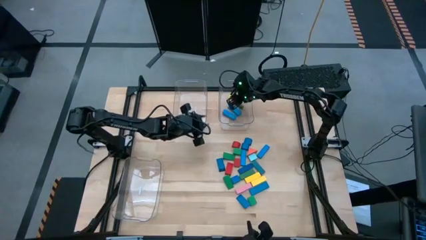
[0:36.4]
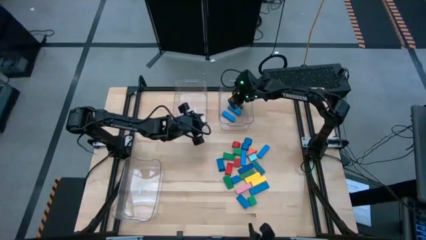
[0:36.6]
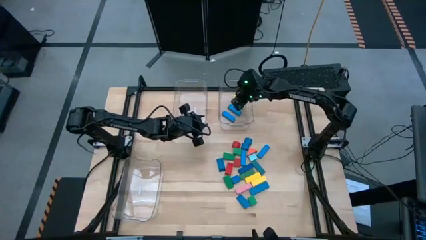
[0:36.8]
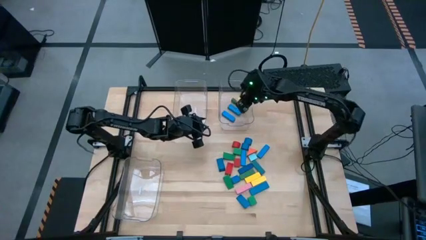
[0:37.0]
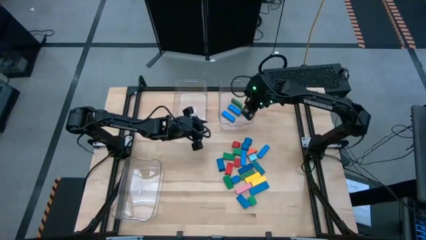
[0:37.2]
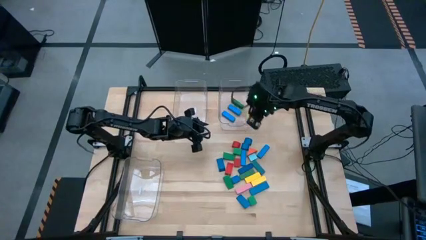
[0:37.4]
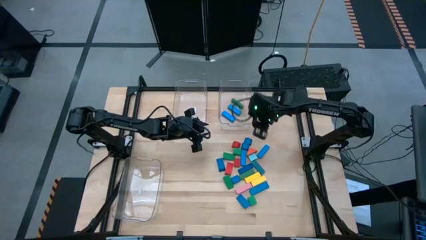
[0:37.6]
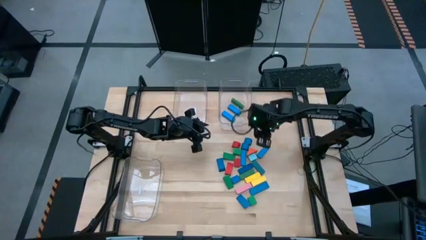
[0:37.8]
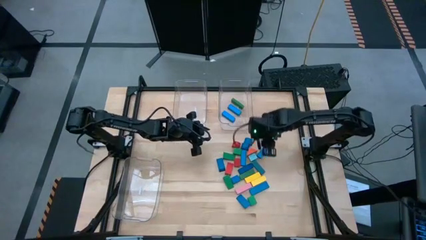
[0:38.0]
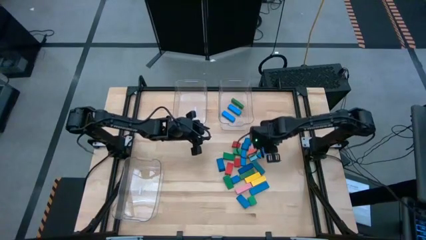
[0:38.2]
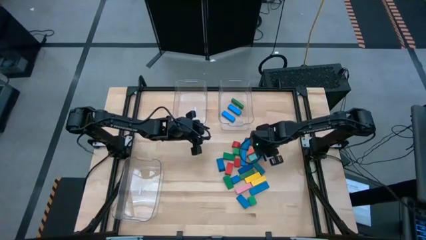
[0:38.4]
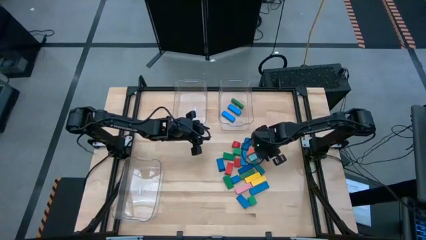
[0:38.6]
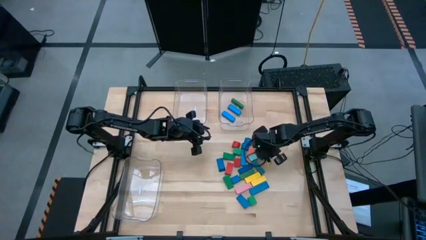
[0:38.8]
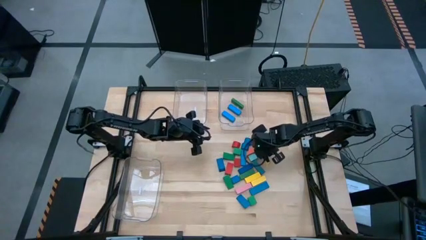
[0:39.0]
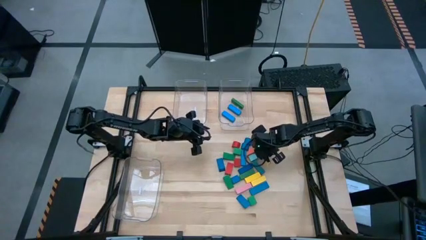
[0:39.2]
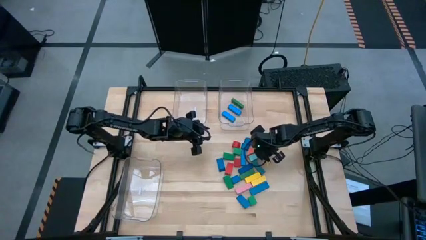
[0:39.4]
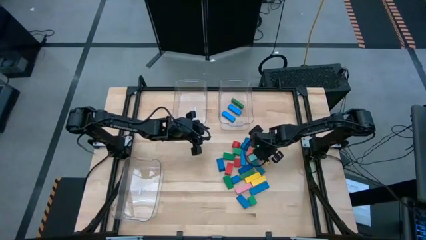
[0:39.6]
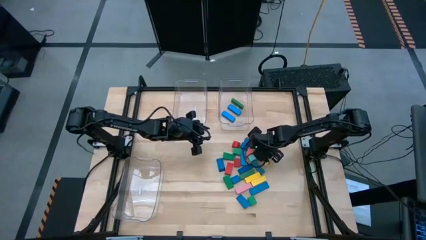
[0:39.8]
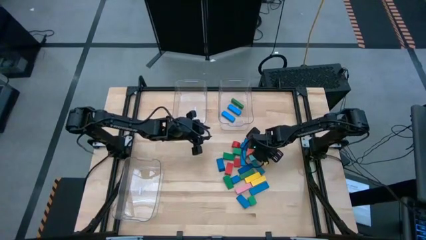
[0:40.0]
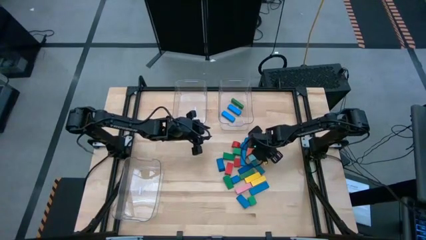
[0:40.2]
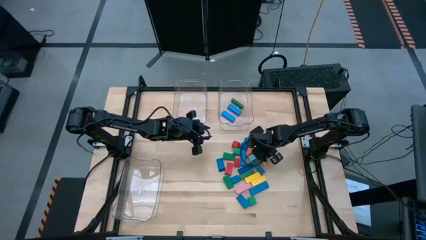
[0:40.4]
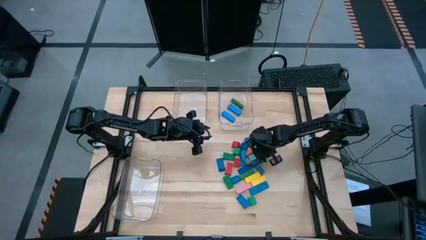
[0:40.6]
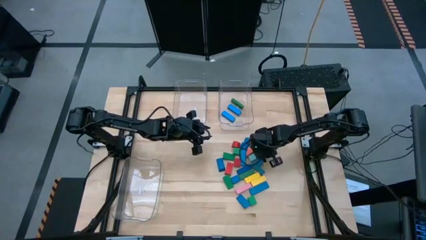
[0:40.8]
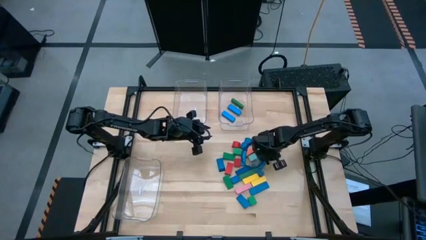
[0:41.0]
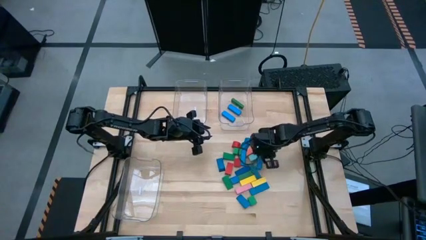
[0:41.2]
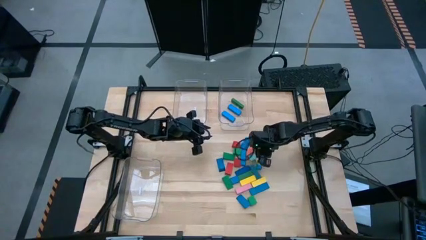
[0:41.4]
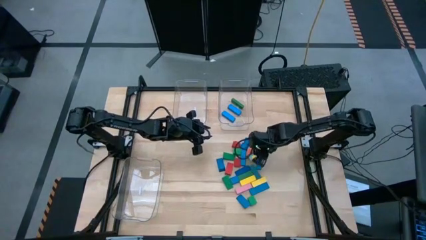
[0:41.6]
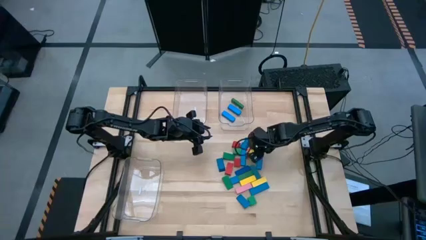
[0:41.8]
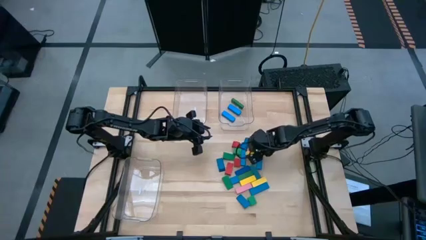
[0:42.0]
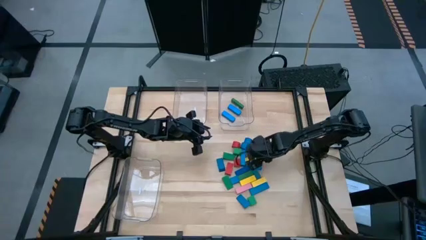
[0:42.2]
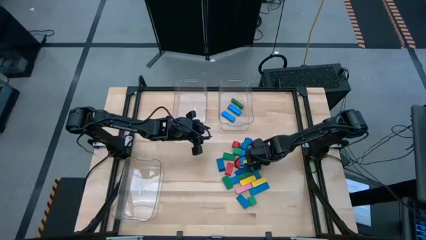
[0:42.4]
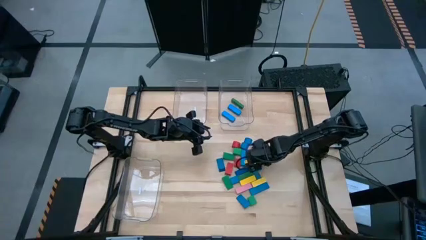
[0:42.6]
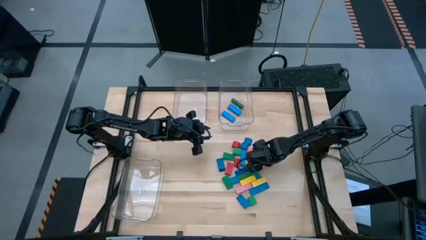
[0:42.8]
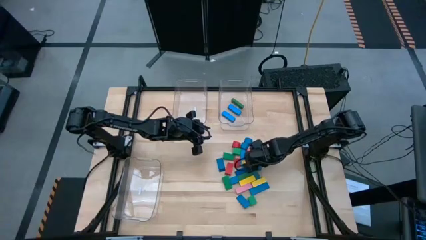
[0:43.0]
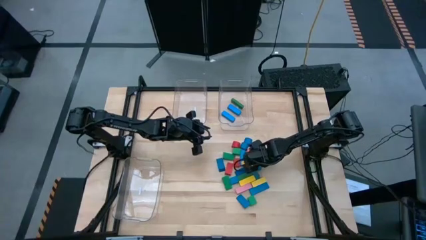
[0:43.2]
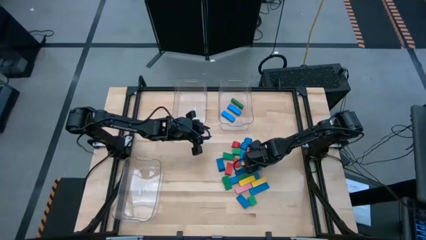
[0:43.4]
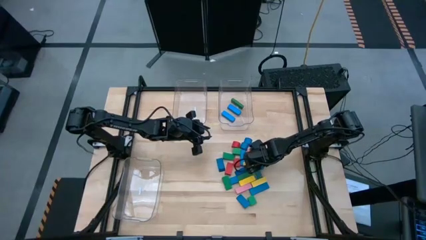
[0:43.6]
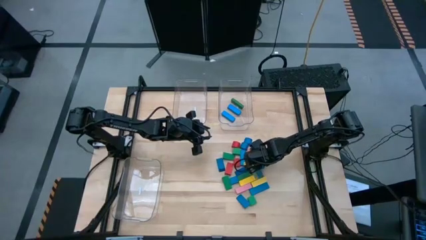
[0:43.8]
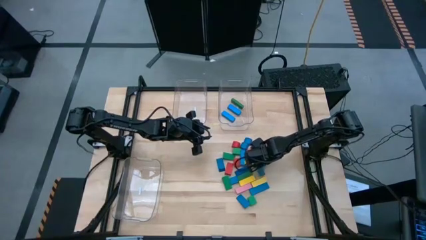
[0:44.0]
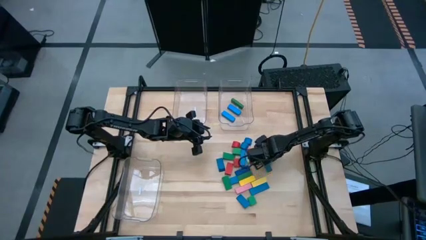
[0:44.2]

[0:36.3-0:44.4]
Task: Sort blocks by size
Put the blue rectangular block into the top right transparent bin

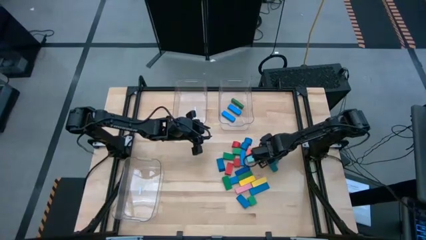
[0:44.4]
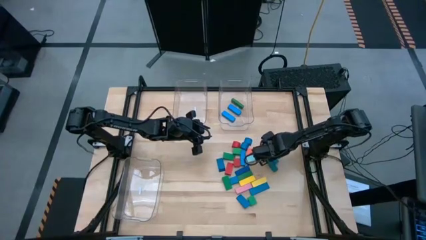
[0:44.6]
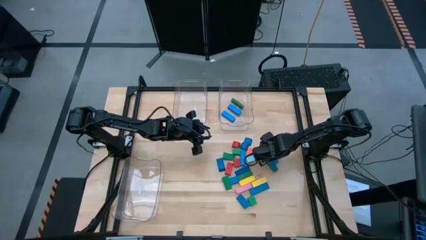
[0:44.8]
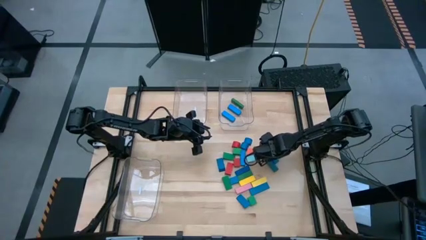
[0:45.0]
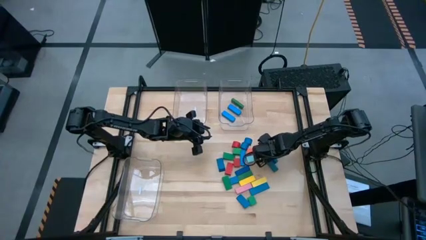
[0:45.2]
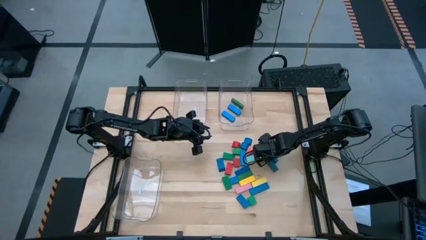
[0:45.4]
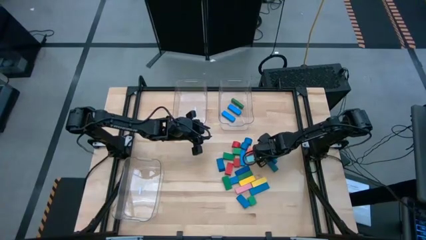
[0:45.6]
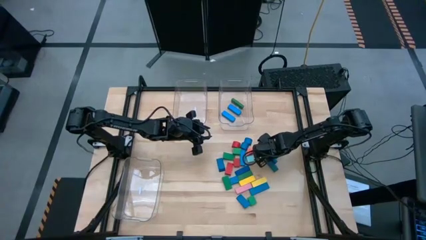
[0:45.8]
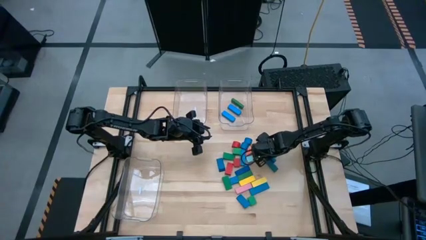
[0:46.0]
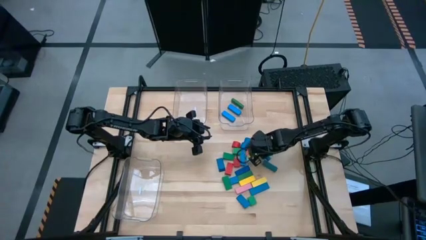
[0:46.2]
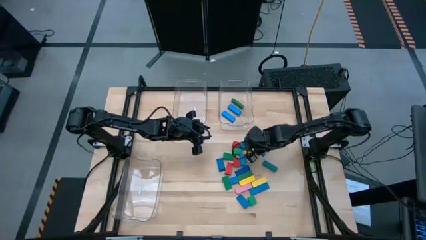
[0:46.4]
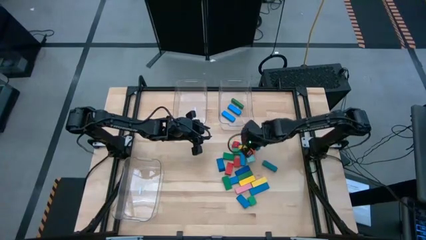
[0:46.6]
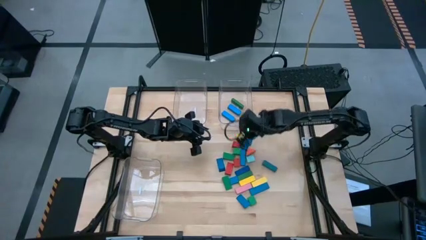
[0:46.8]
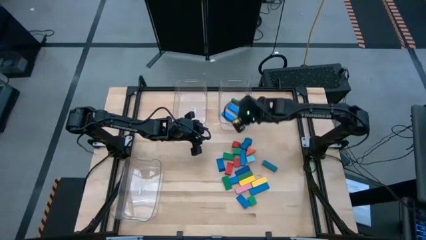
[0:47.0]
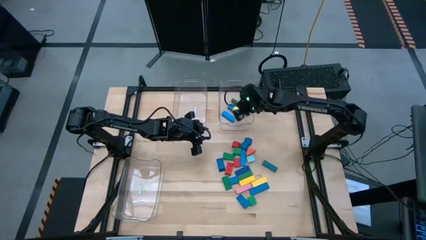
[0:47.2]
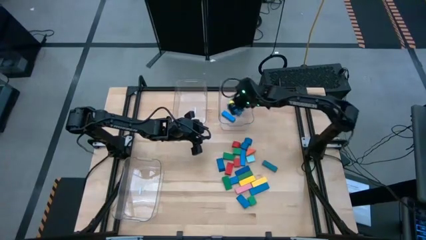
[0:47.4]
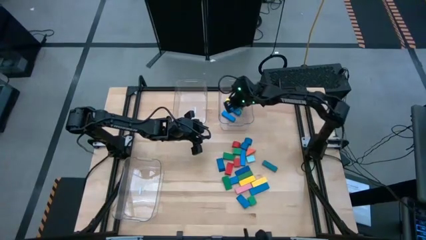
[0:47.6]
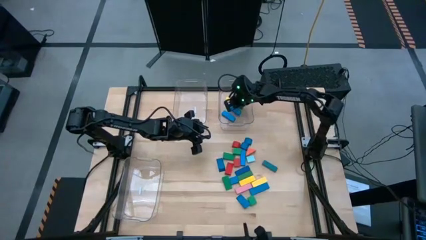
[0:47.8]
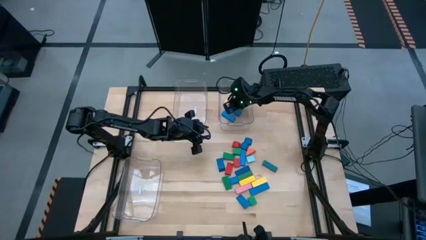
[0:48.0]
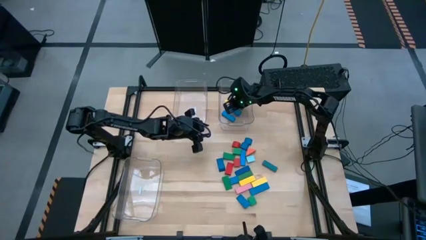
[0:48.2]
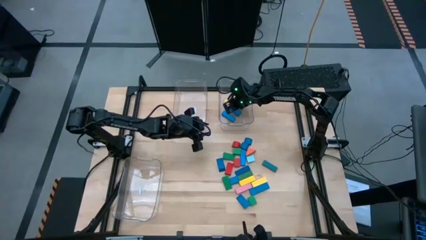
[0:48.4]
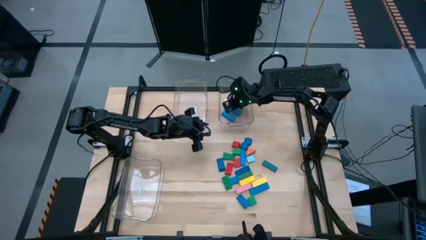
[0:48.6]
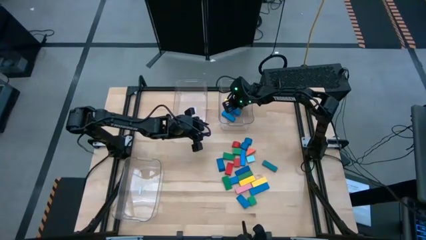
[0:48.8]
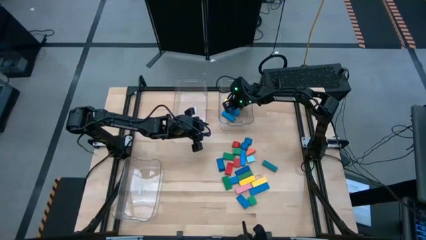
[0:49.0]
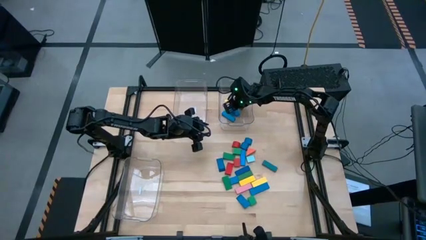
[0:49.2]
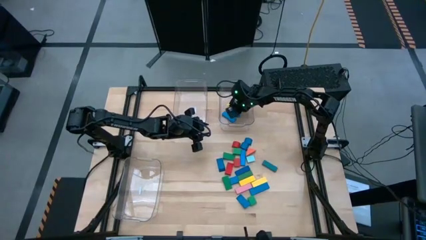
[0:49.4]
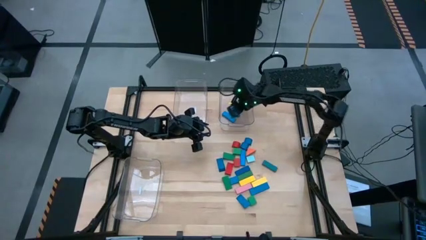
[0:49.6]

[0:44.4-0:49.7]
Put the blue rectangular block into the top right transparent bin

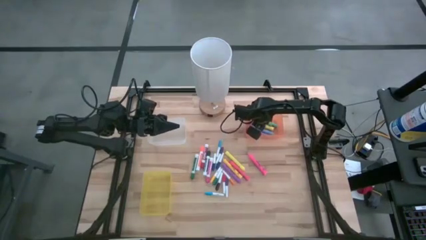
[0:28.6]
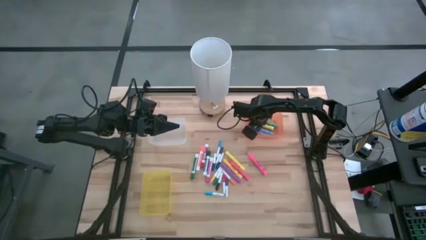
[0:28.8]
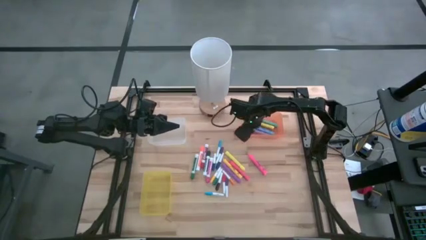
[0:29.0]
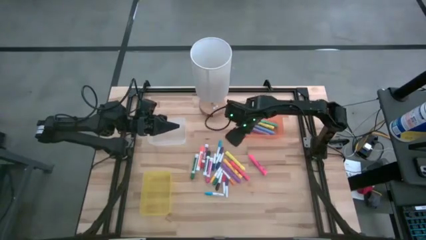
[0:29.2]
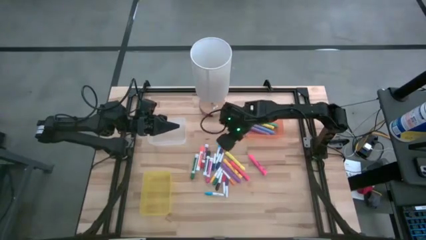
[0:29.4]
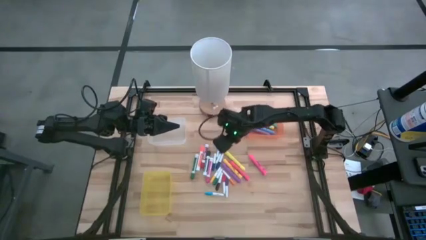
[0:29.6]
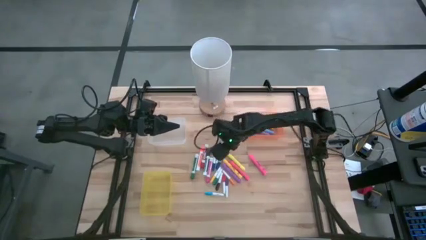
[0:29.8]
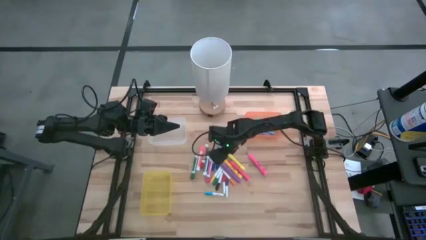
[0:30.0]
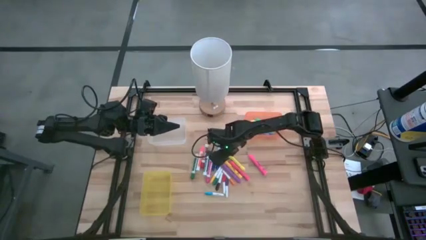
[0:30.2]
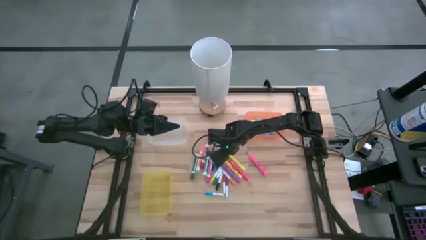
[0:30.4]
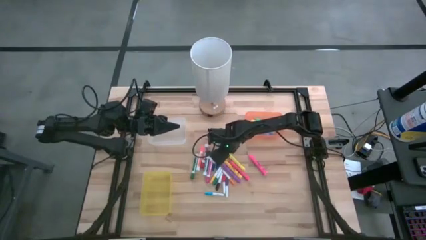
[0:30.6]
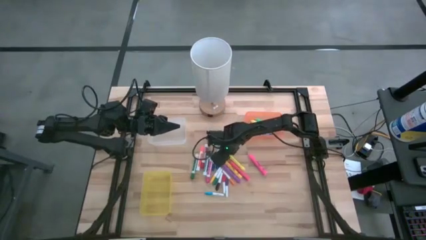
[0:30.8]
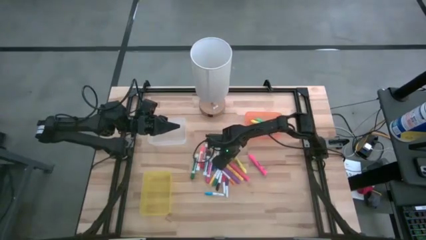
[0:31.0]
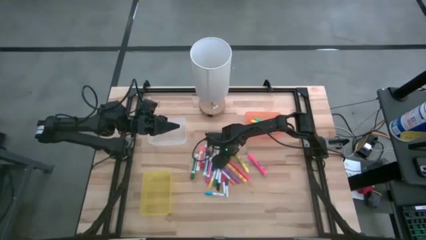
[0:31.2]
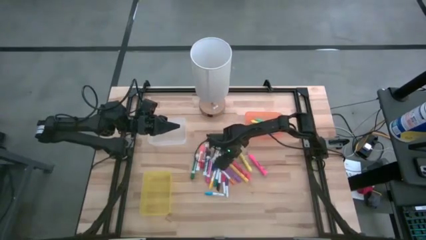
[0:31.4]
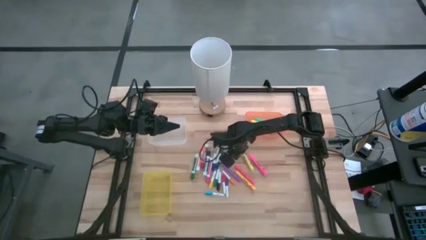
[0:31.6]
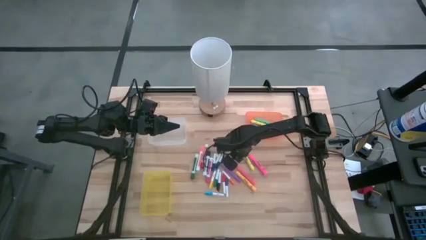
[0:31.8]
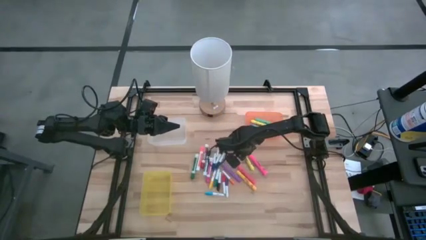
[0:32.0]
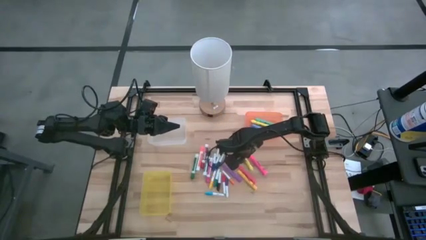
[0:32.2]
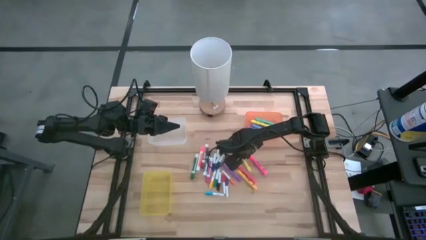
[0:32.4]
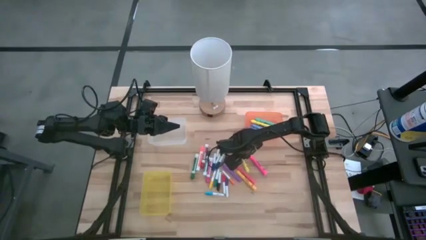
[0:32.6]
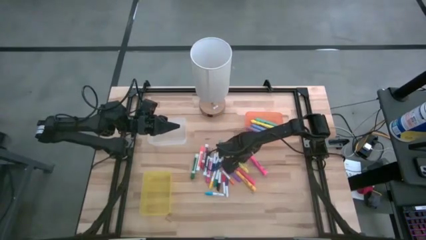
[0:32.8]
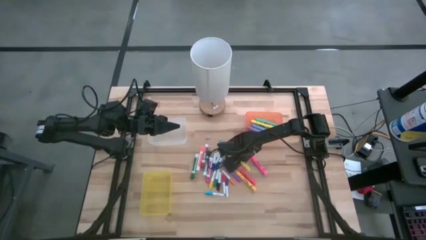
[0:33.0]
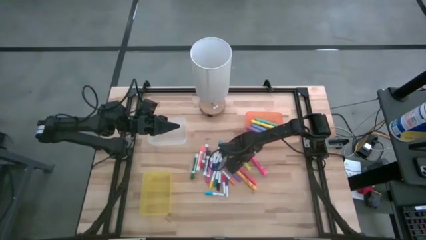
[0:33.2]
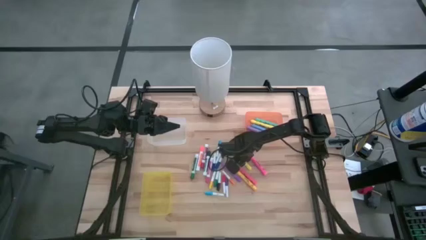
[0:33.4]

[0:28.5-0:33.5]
Task: Pick & Place Markers
Put the light yellow highlighter pen into the orange bin
